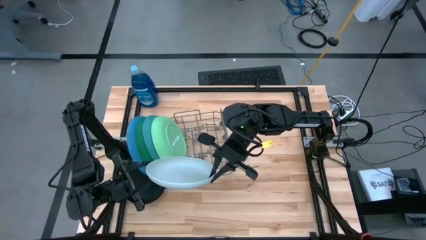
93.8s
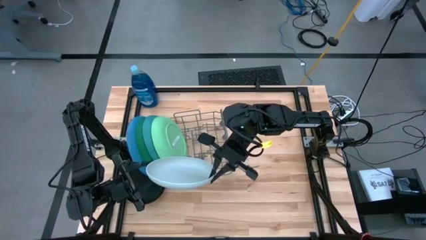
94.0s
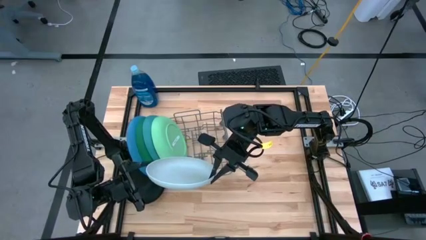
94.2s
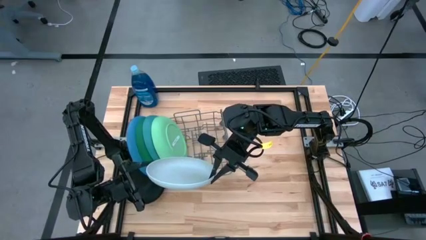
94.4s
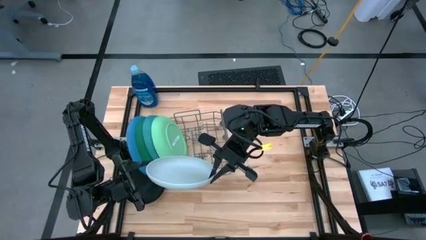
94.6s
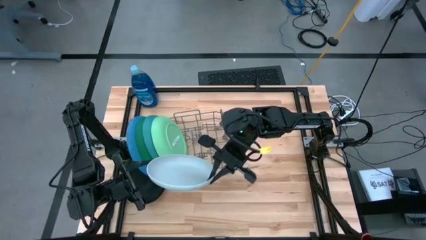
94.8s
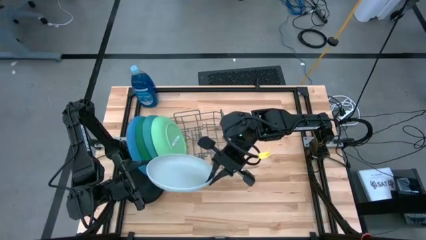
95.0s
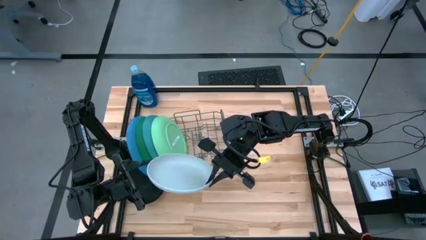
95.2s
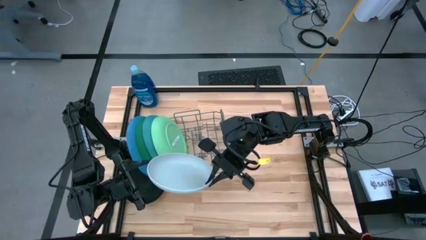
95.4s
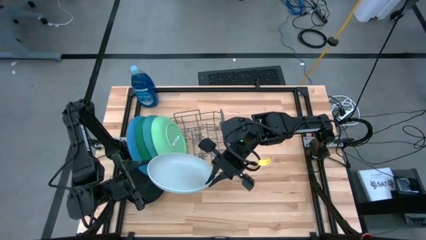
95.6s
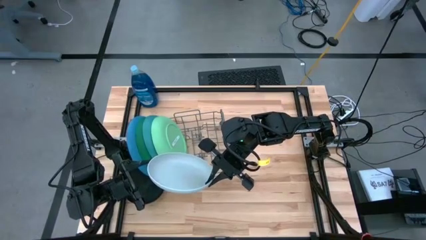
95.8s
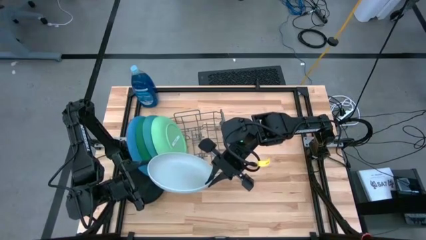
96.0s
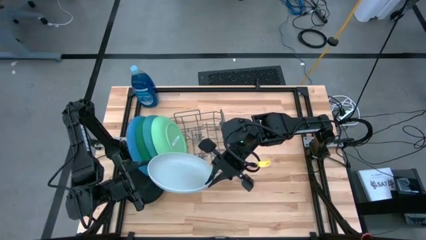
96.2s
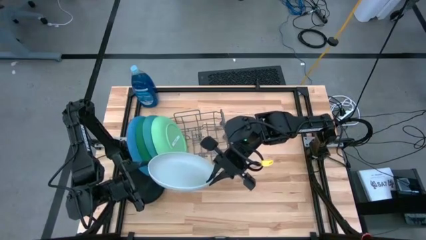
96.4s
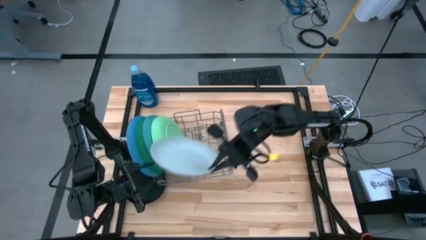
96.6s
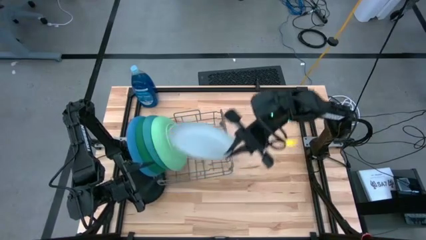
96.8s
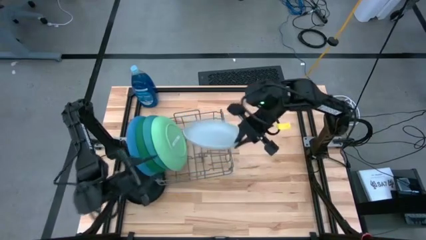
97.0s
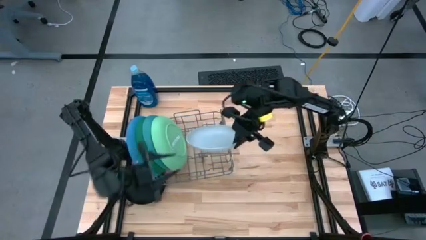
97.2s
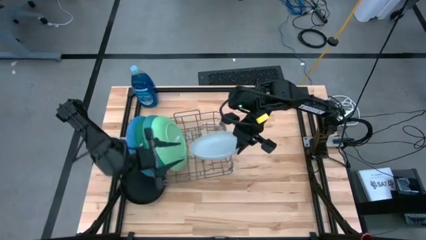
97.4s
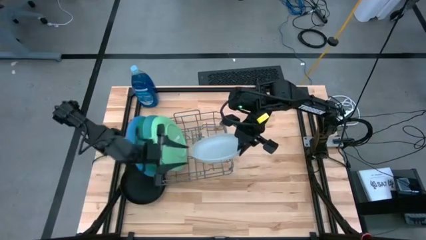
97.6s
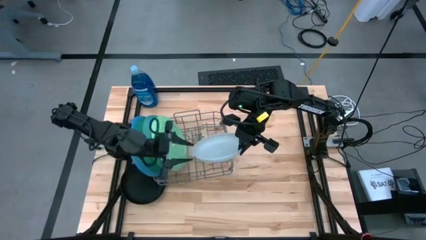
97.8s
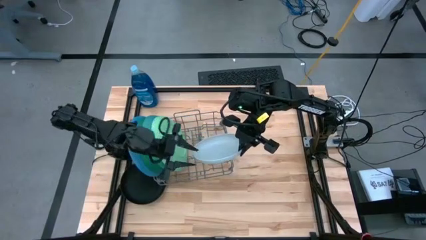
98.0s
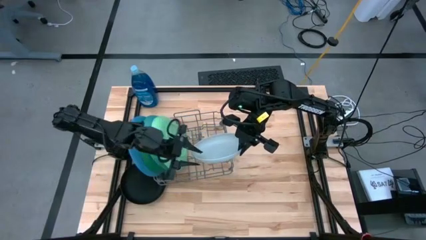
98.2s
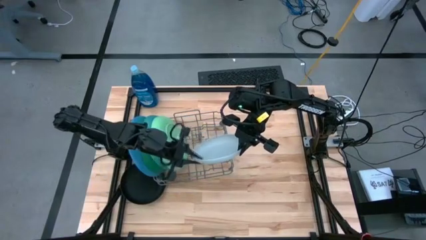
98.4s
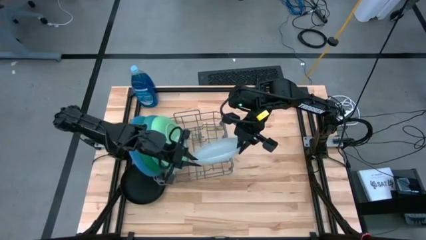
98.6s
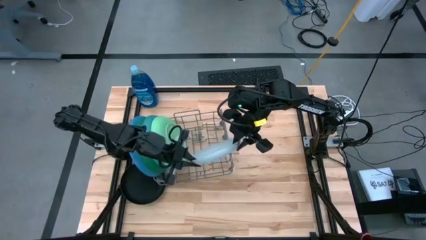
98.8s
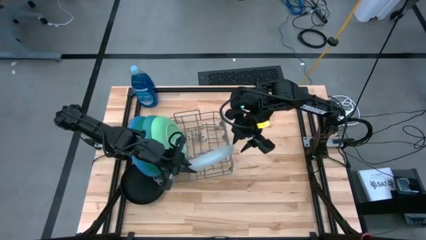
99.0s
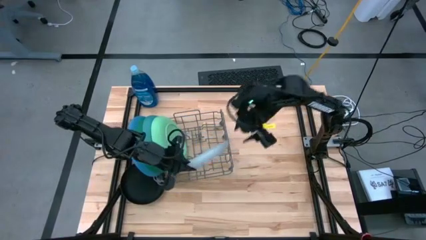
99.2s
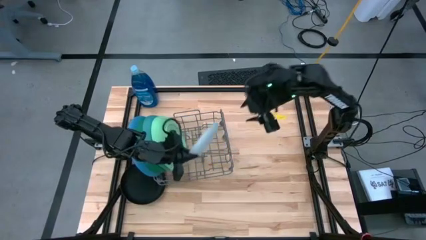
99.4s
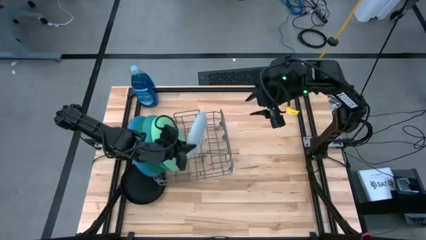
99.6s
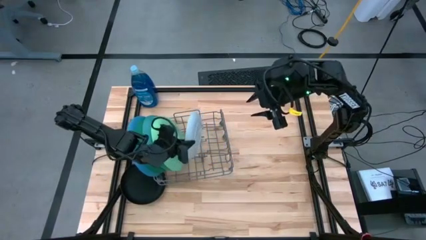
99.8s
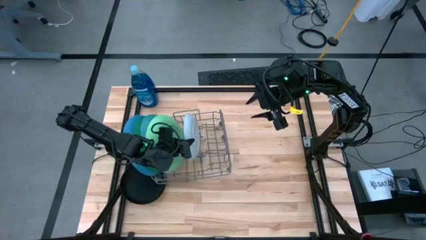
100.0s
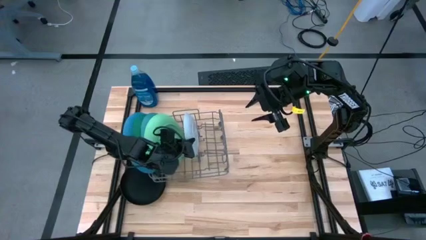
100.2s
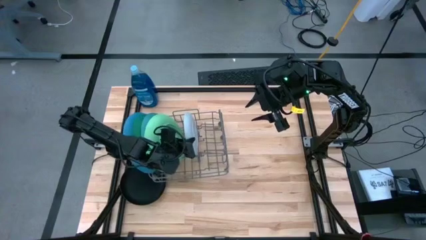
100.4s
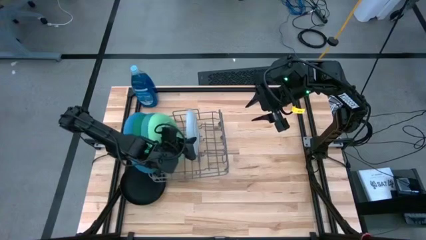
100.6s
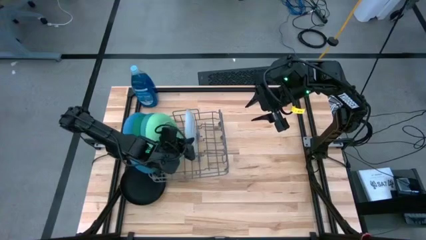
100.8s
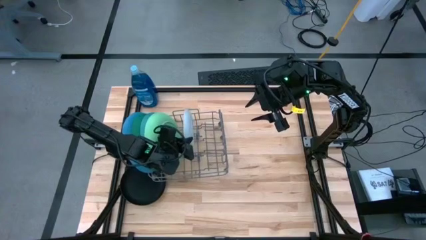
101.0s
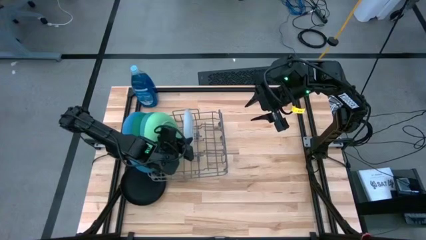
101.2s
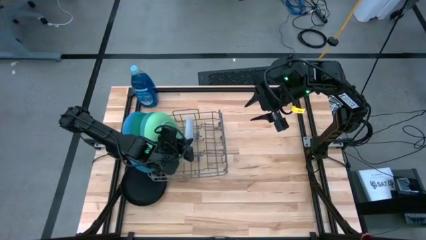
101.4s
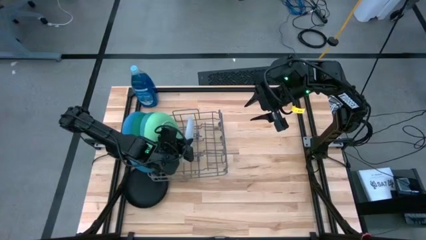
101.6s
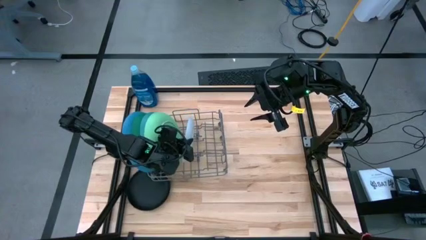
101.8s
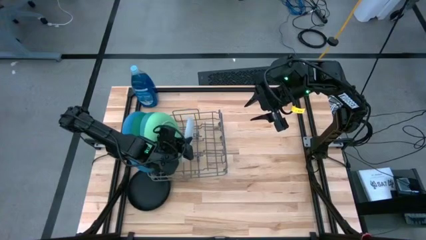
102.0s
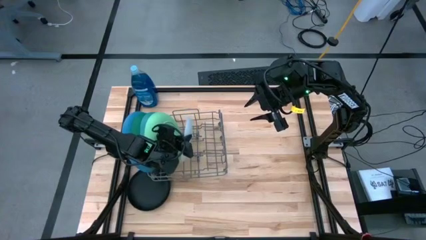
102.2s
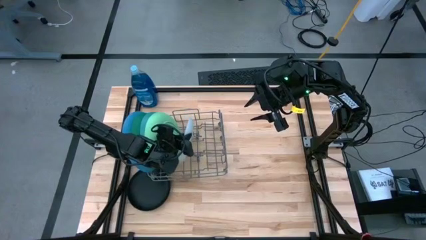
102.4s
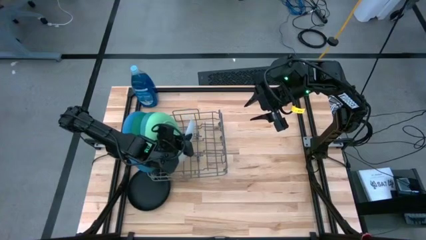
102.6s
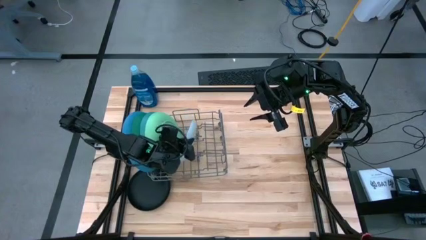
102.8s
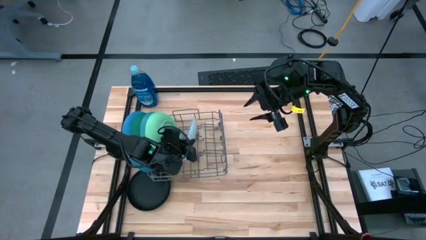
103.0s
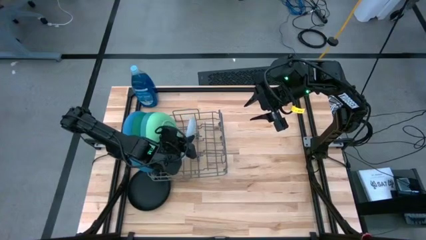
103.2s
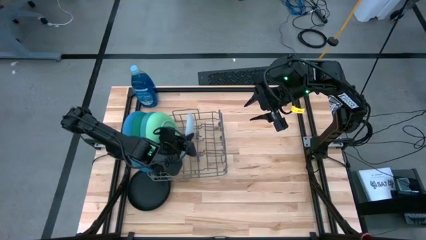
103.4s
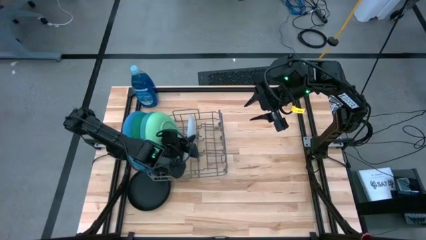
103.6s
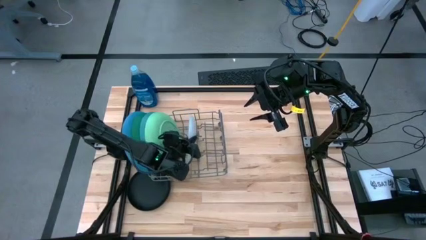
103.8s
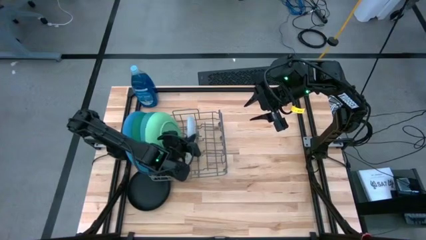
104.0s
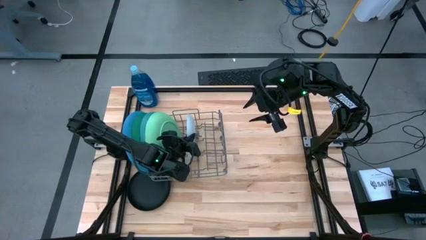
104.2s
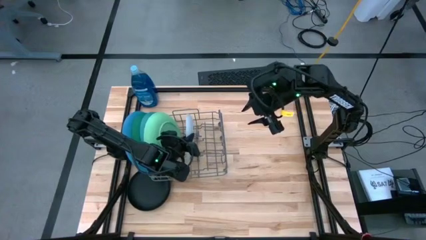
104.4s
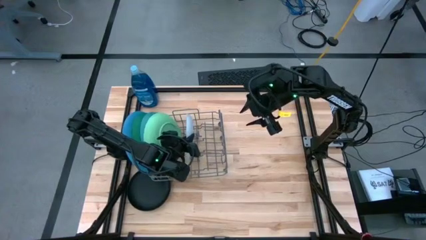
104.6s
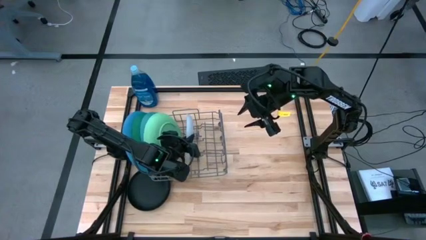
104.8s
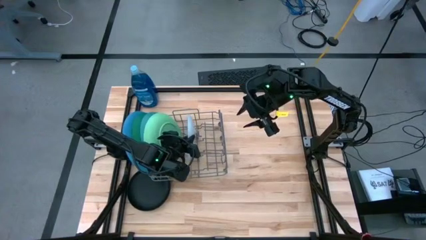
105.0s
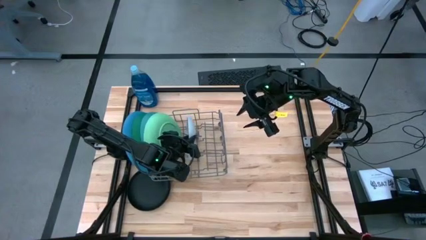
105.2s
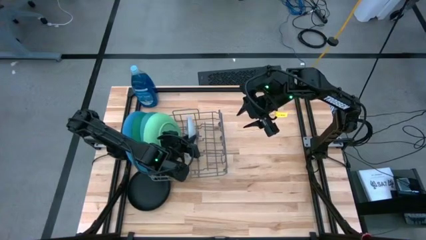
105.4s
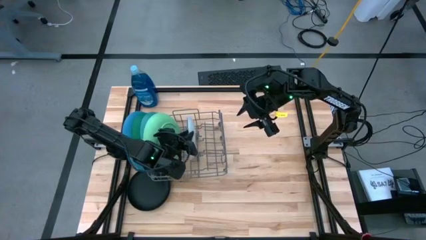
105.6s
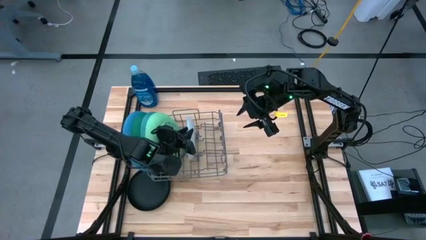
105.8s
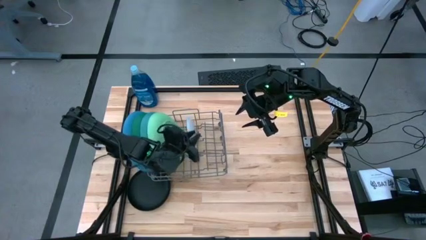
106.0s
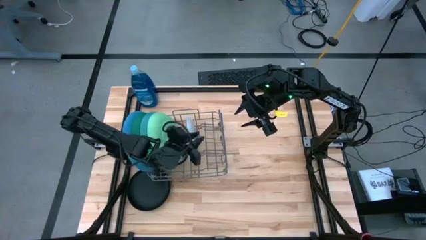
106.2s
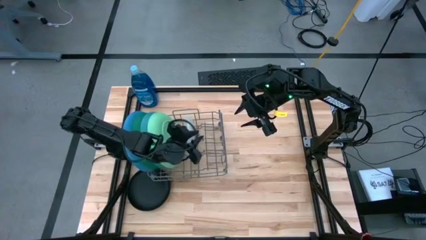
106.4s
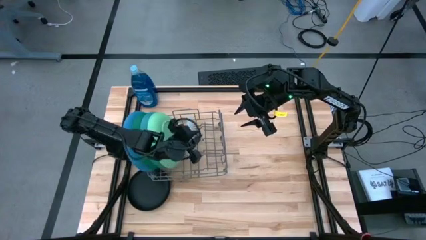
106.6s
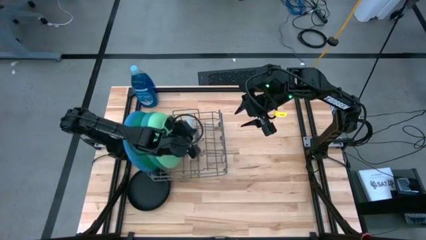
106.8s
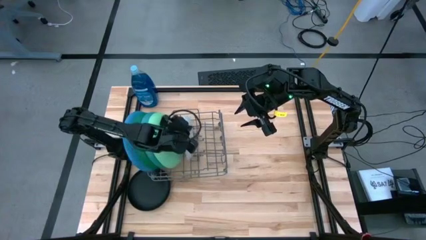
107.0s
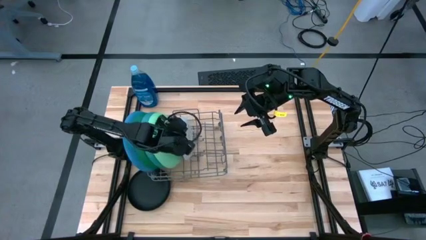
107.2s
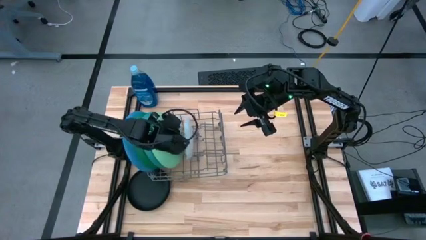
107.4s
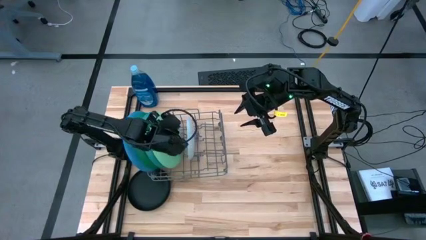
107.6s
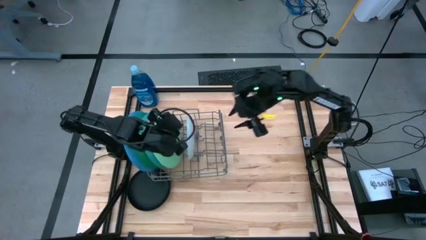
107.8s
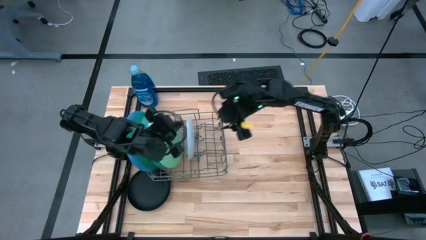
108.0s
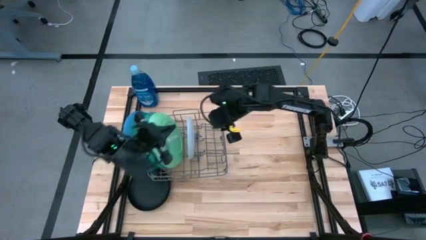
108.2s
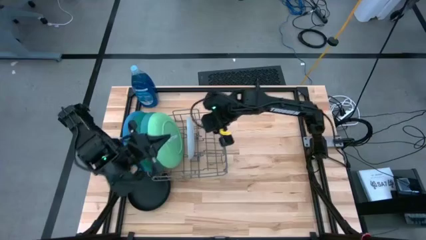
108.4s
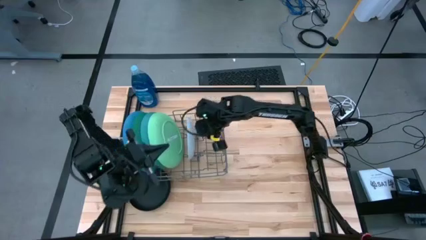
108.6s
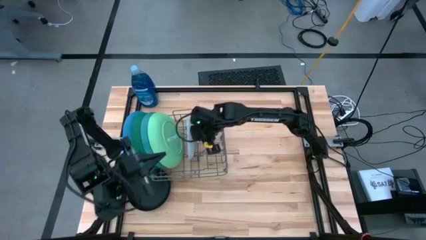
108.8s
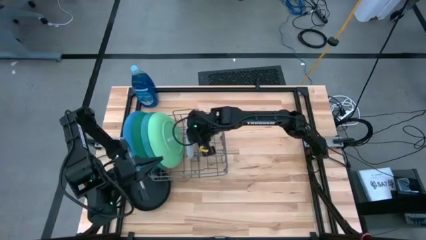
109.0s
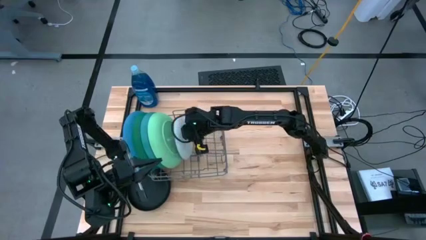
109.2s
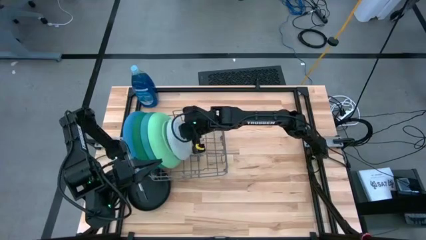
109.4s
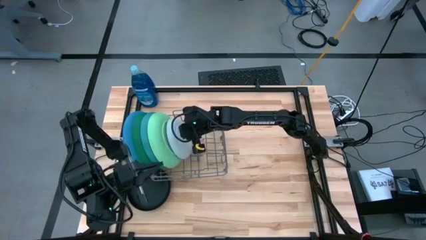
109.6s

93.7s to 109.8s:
Task: Sort dishes
Put the gray plate into the gray dish rack
